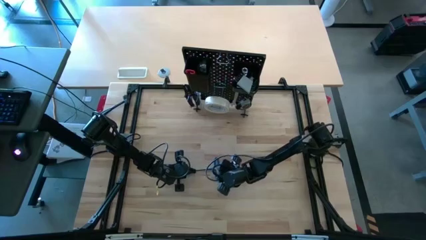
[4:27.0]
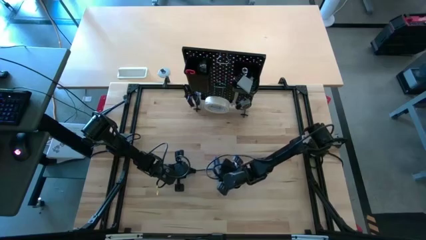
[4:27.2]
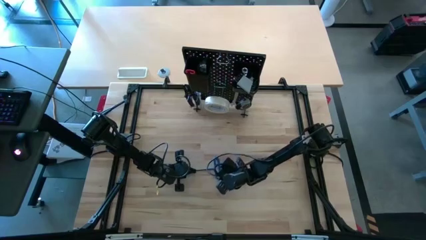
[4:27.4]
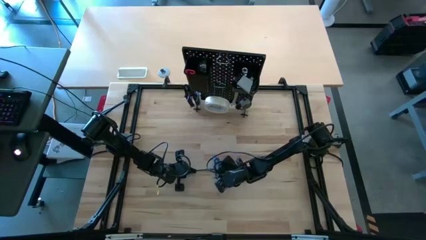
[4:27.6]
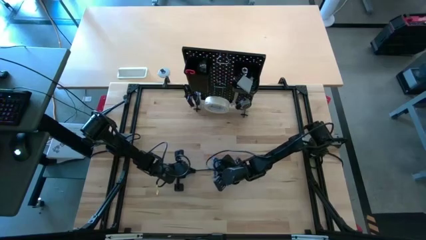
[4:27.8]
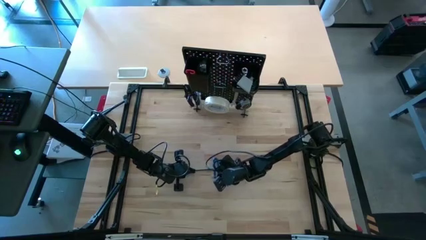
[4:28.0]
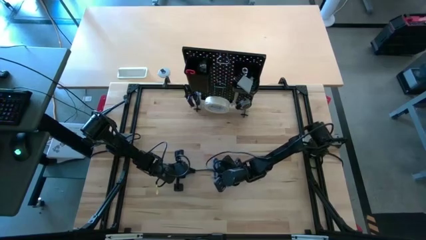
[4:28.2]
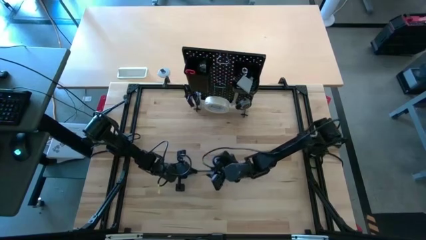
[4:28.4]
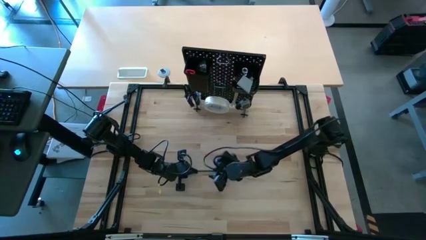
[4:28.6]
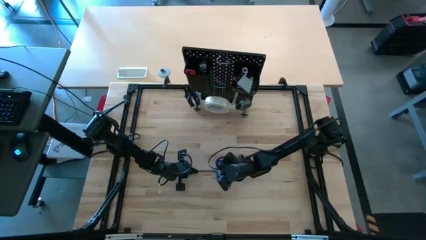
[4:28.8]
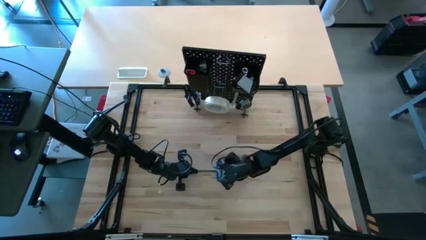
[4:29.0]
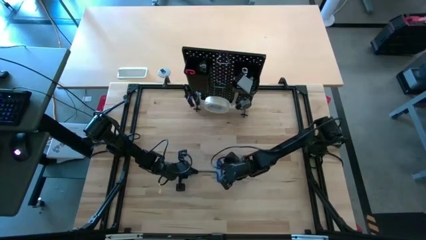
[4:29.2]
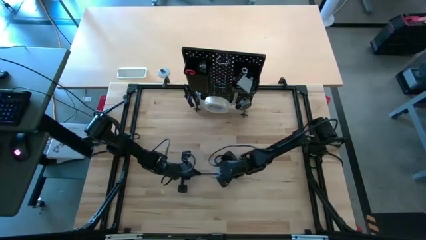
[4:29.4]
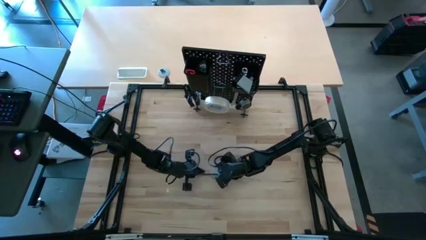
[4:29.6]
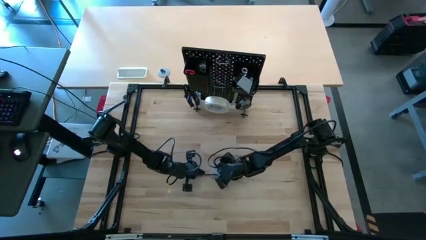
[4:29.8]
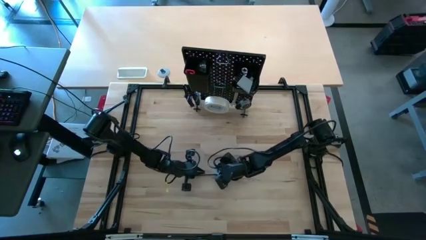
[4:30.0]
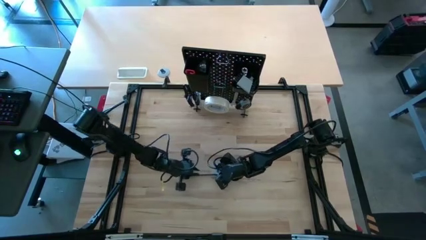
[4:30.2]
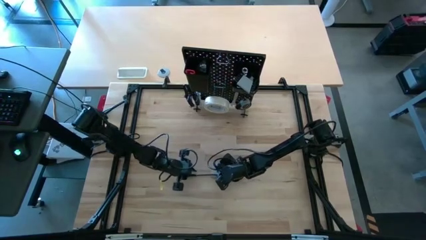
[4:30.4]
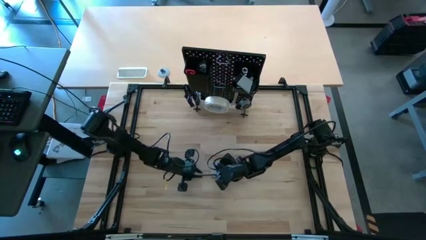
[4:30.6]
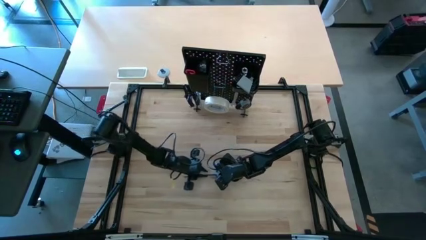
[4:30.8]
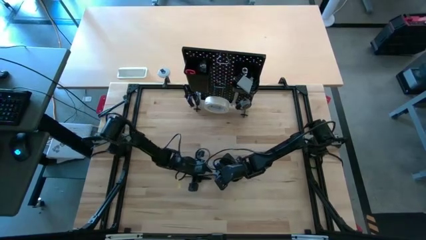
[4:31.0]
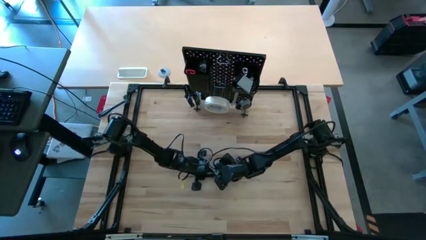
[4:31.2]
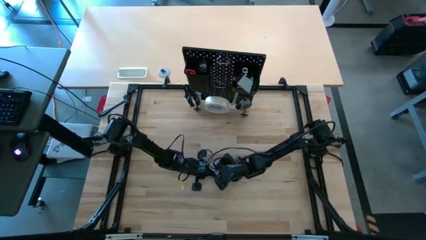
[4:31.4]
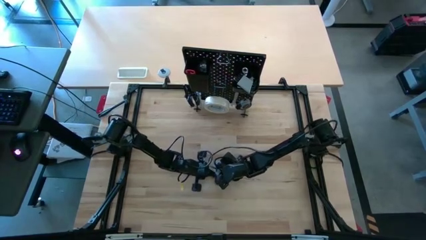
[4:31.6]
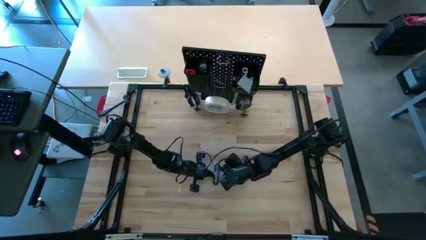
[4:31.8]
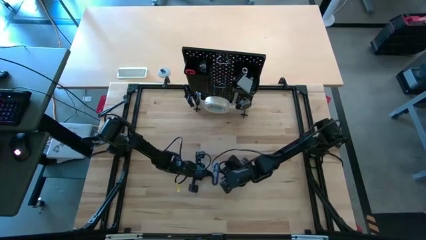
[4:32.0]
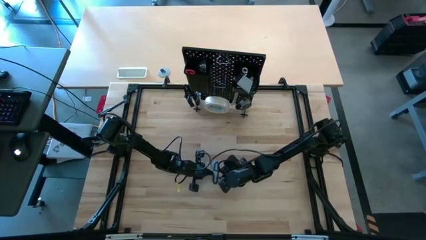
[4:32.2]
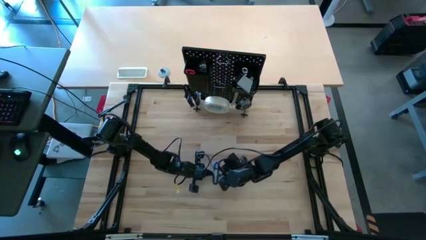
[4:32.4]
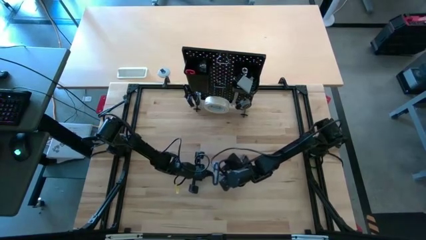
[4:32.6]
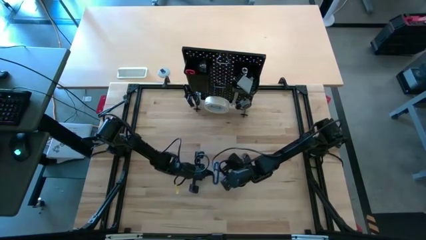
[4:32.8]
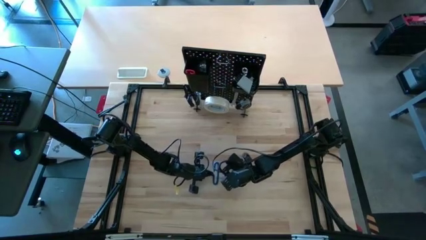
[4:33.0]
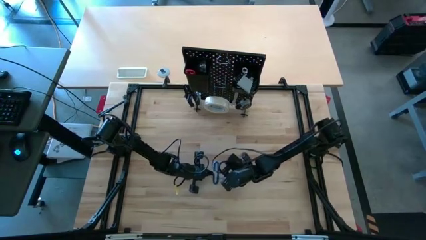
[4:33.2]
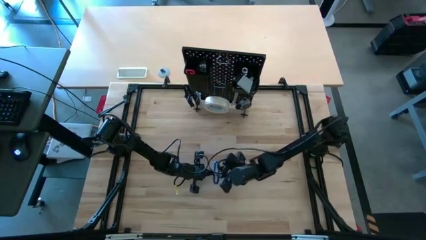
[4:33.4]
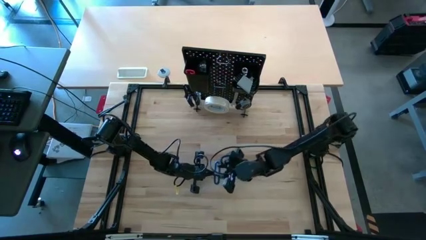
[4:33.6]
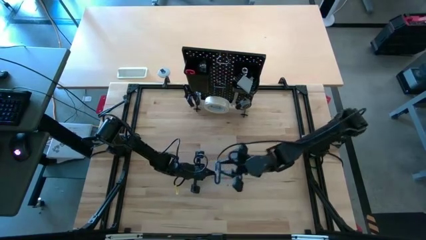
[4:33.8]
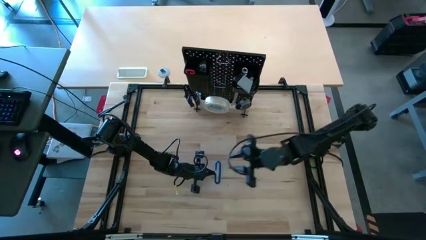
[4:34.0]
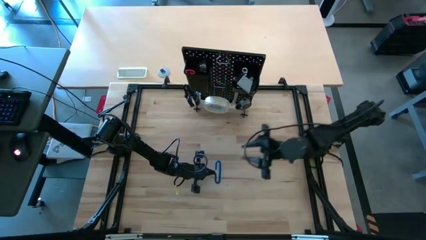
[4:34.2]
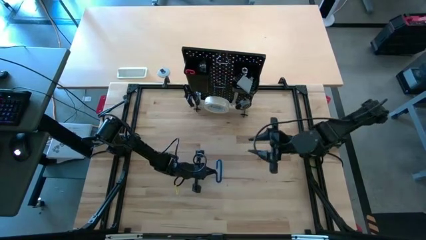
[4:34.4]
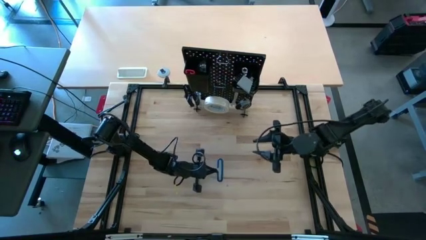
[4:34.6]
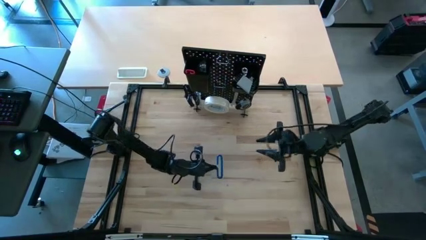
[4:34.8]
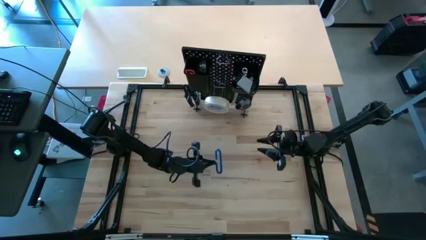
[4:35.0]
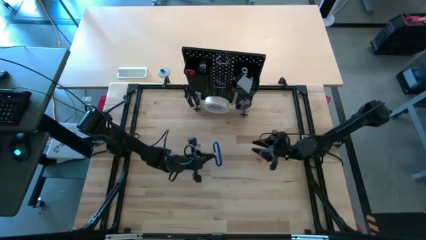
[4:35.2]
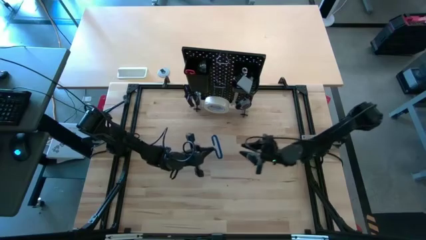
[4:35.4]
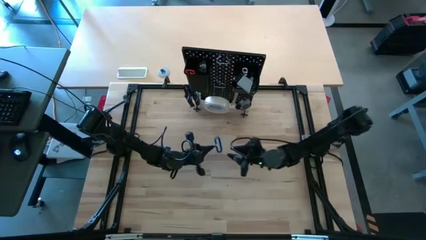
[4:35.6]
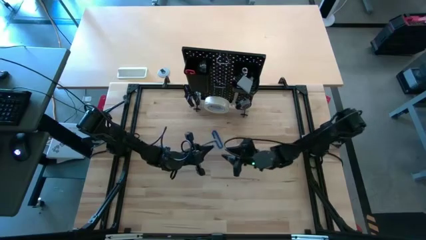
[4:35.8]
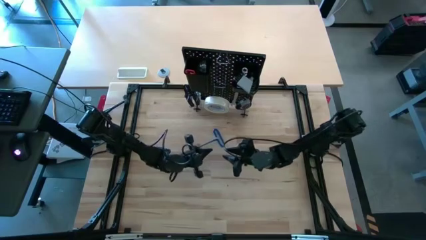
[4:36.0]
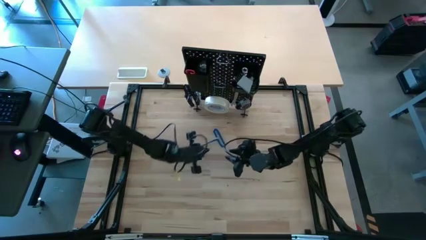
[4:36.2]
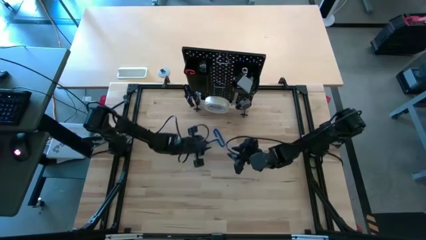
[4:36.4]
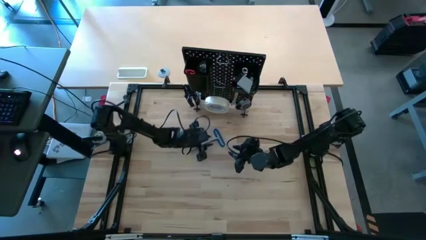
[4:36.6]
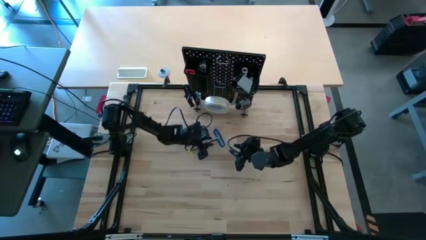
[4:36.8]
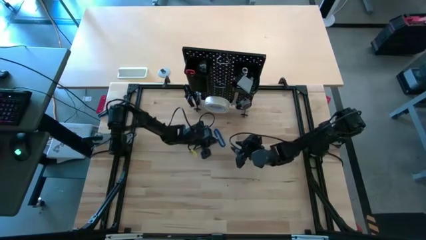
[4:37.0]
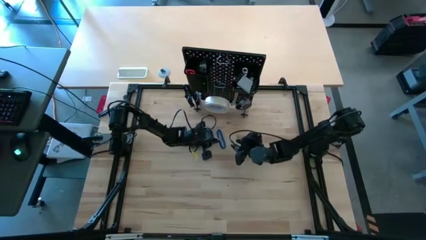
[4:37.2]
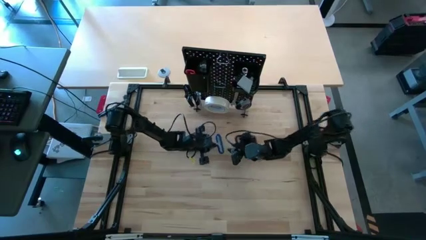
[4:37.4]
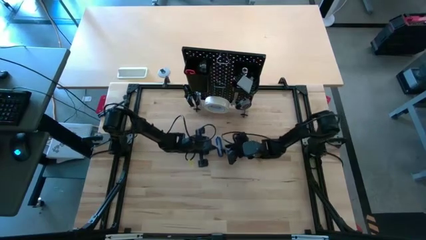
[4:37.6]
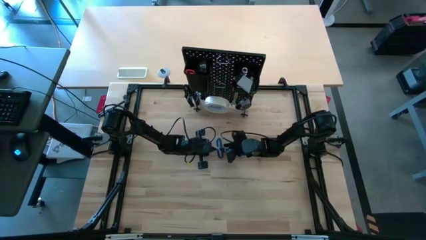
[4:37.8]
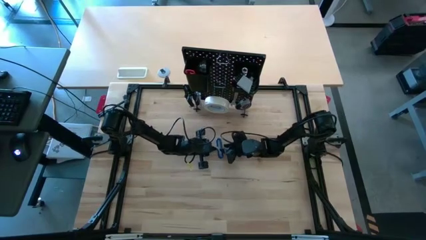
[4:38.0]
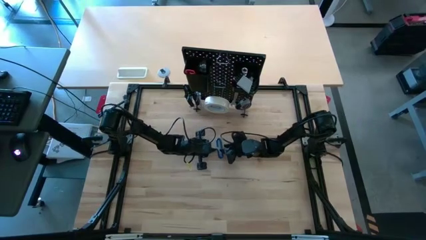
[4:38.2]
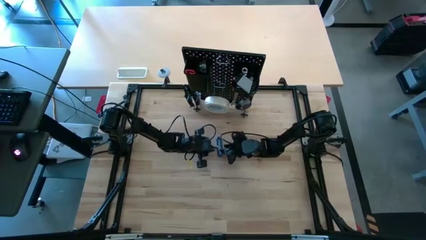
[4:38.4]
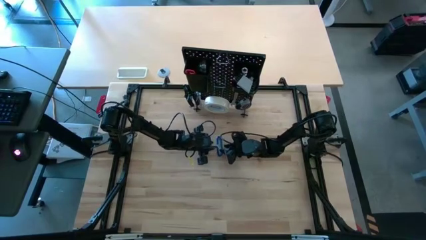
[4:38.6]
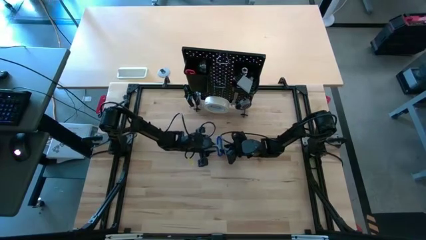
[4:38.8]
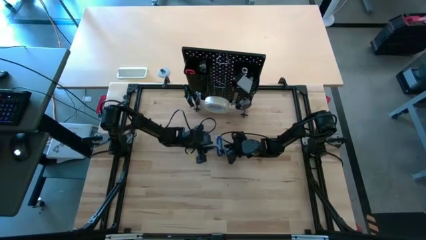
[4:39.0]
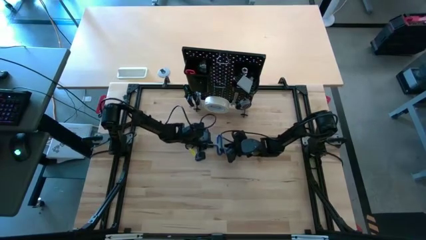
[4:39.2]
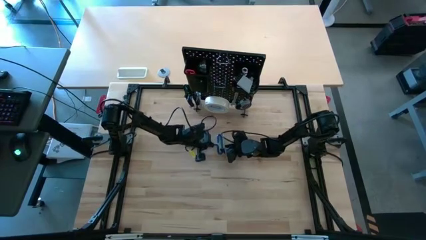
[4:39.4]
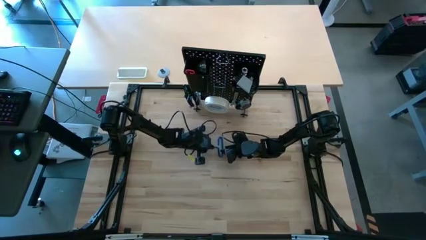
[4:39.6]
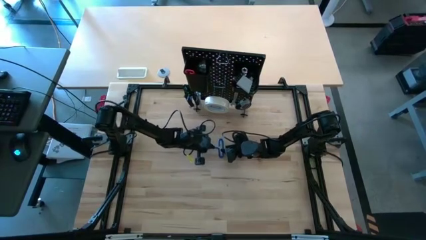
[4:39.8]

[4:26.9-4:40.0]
Task: Hang tools onto peg board
Hang the blue allen wrench on the pegboard

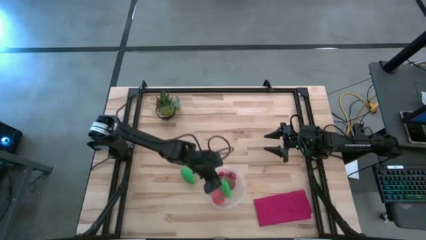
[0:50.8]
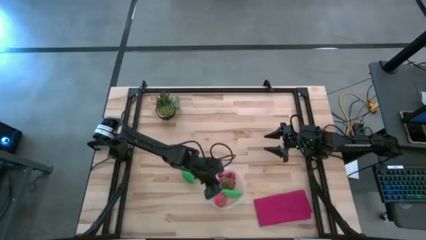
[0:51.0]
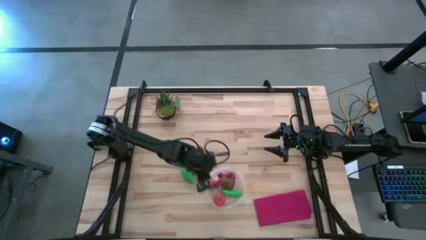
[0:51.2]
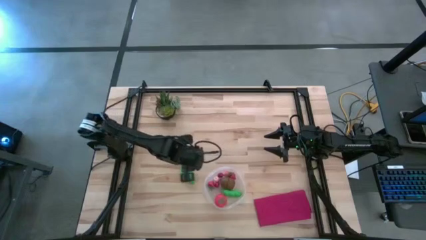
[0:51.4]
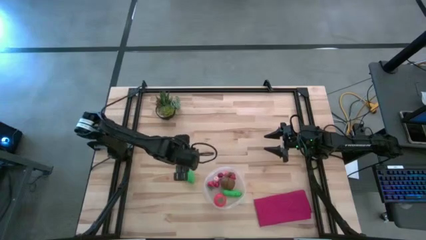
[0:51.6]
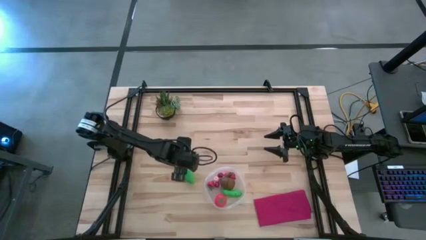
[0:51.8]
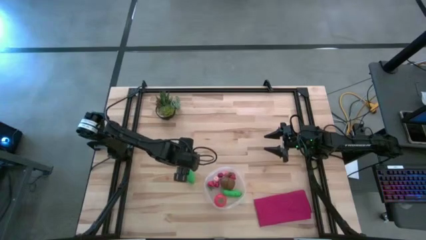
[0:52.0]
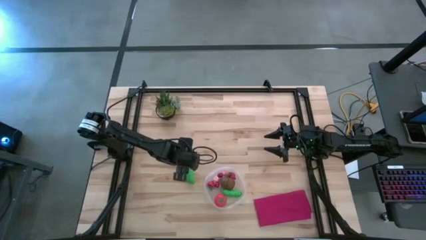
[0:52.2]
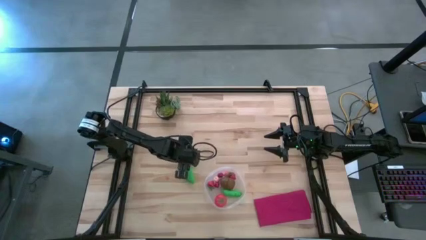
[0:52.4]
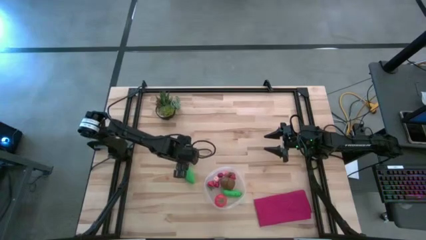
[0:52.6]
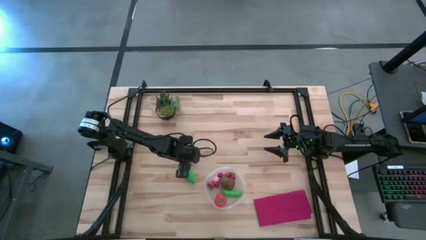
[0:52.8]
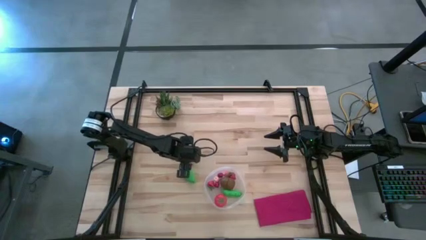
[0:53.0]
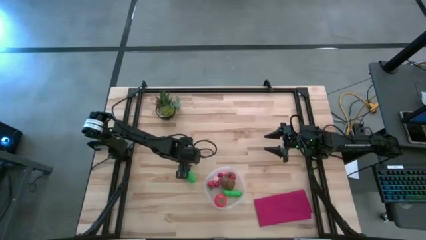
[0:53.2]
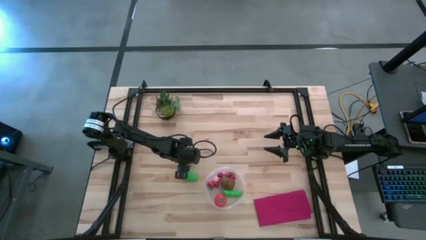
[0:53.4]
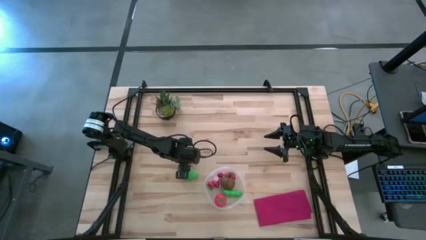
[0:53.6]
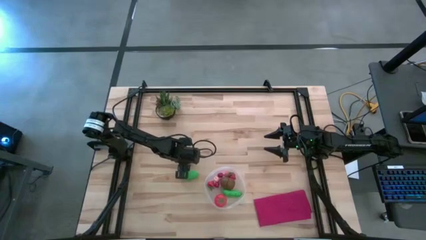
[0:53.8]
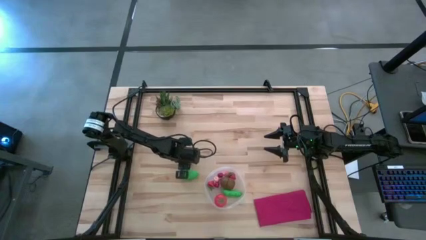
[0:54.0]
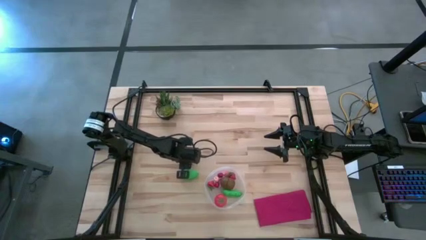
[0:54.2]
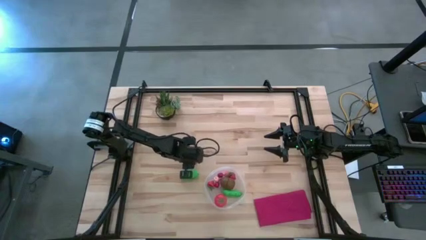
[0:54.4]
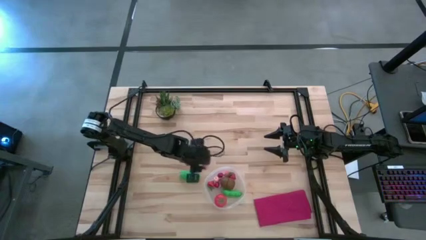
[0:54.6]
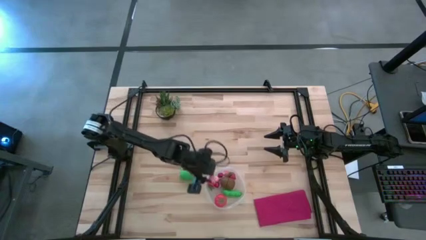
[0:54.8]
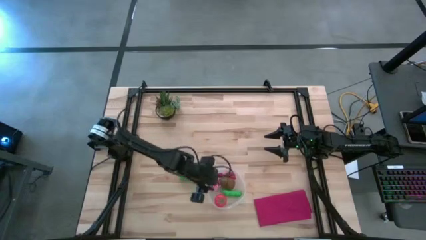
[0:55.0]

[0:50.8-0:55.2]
Task: Pick and placing Produce into tupperware
Put the pink peach into the transparent bin
